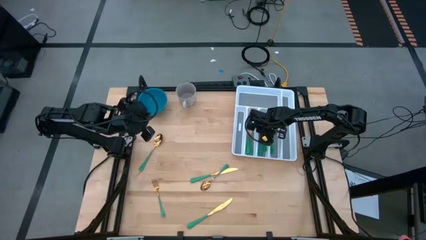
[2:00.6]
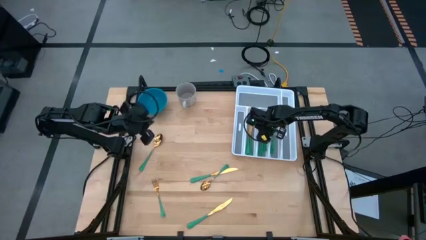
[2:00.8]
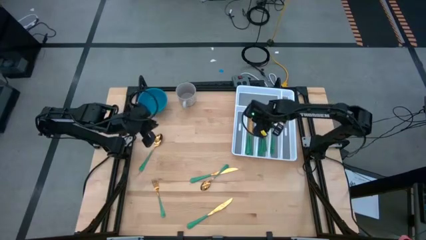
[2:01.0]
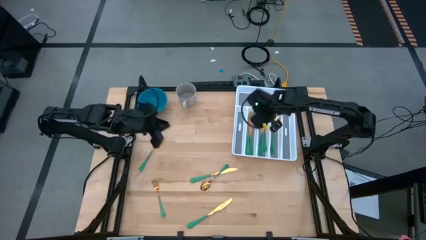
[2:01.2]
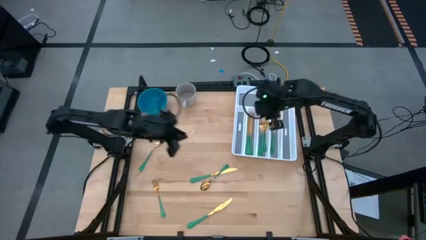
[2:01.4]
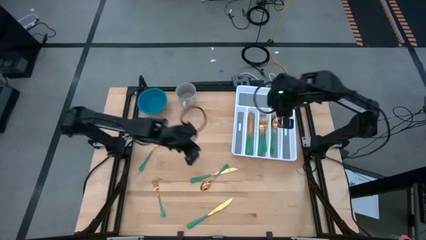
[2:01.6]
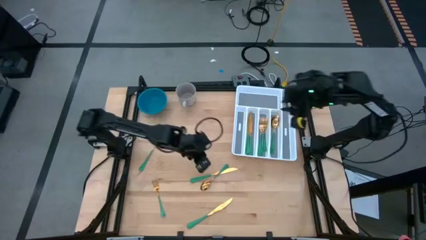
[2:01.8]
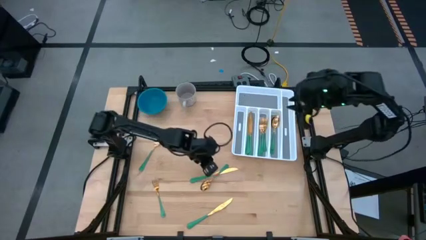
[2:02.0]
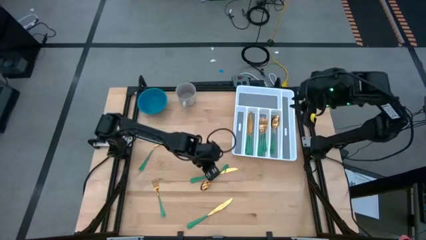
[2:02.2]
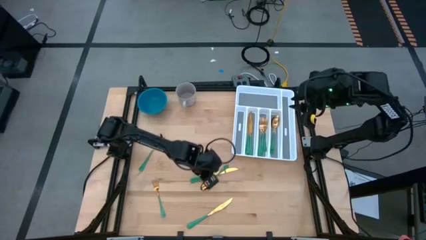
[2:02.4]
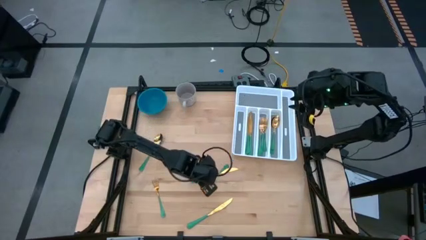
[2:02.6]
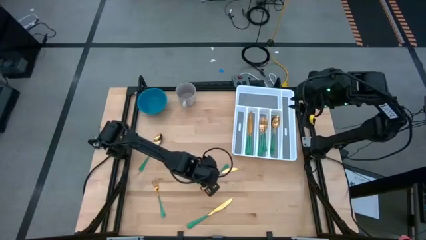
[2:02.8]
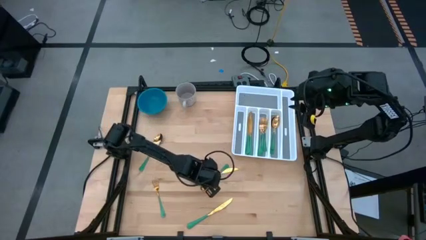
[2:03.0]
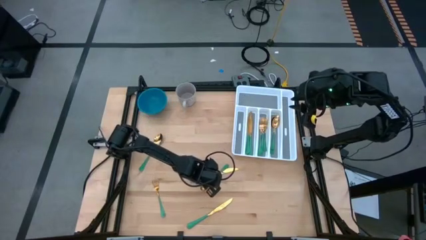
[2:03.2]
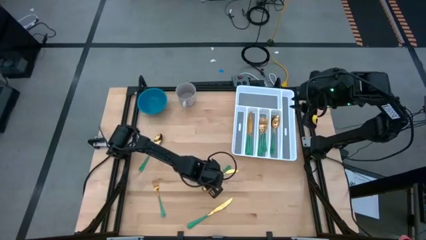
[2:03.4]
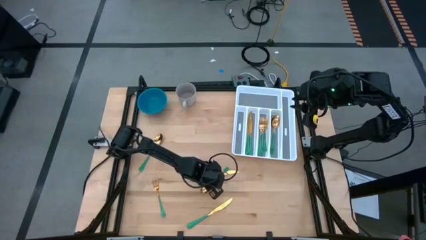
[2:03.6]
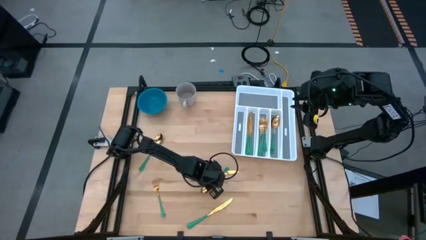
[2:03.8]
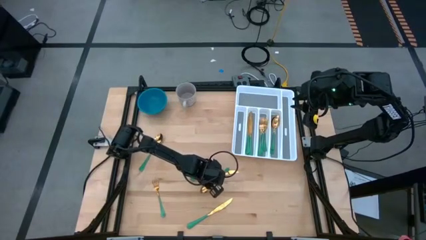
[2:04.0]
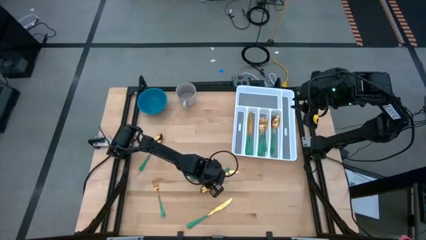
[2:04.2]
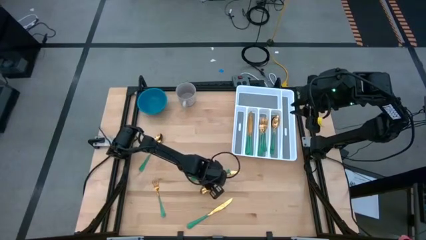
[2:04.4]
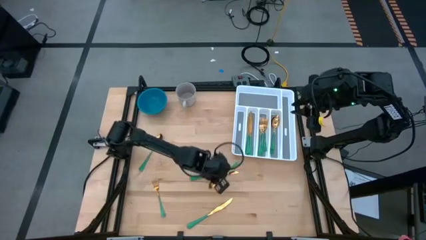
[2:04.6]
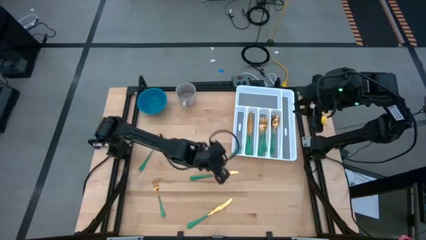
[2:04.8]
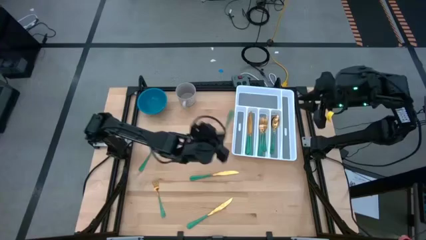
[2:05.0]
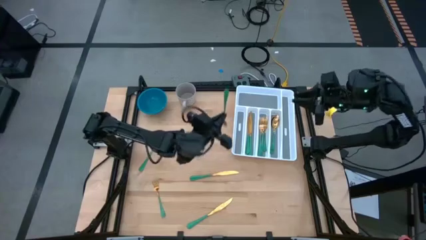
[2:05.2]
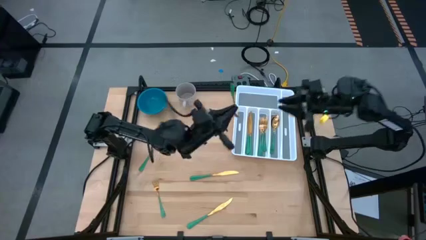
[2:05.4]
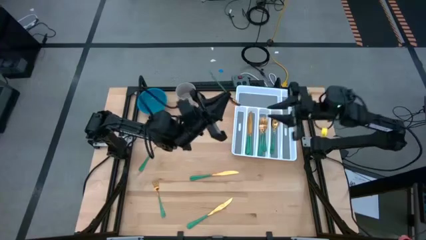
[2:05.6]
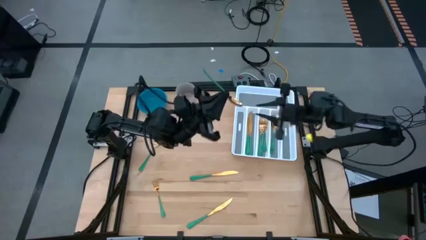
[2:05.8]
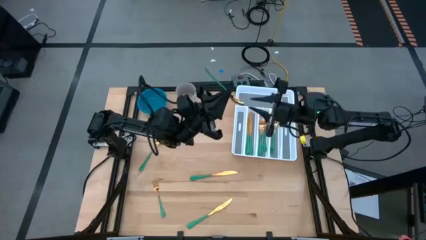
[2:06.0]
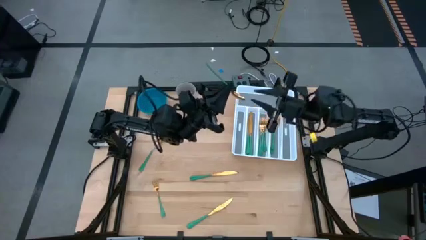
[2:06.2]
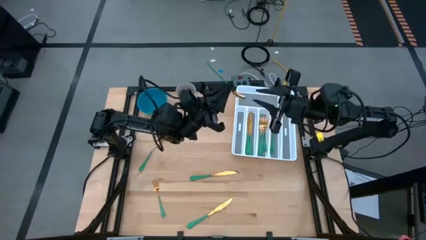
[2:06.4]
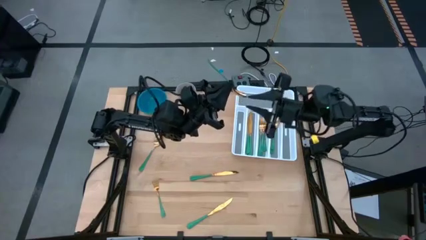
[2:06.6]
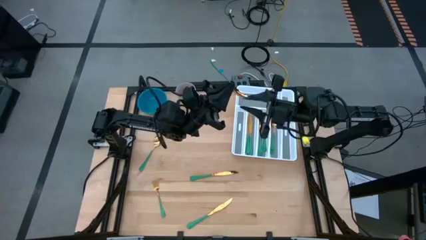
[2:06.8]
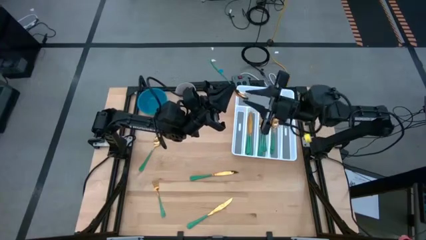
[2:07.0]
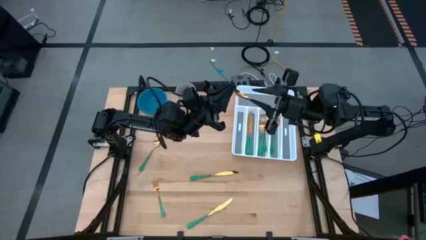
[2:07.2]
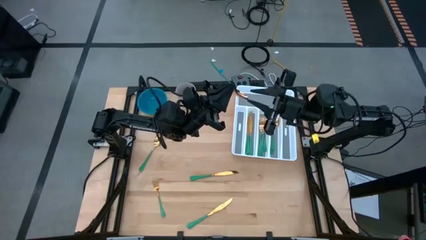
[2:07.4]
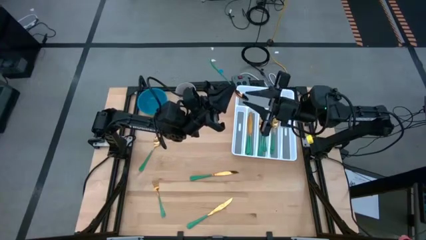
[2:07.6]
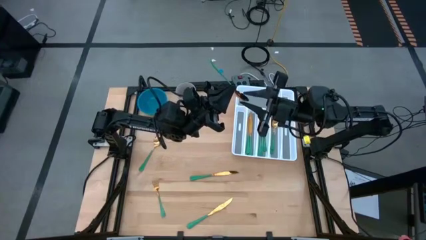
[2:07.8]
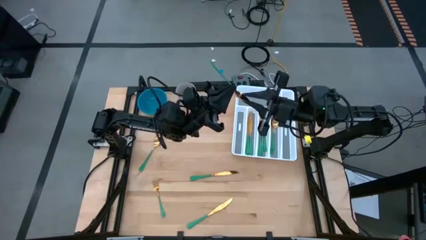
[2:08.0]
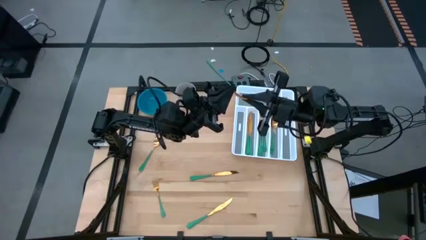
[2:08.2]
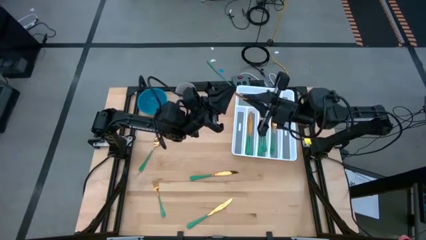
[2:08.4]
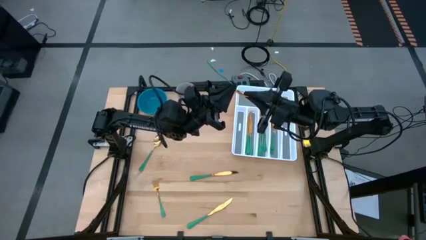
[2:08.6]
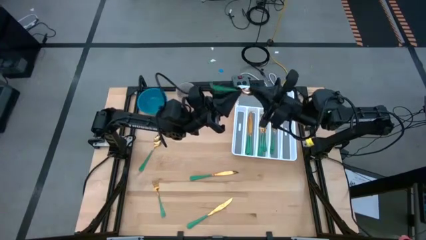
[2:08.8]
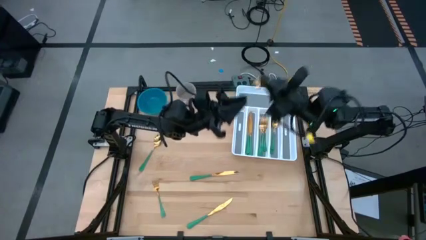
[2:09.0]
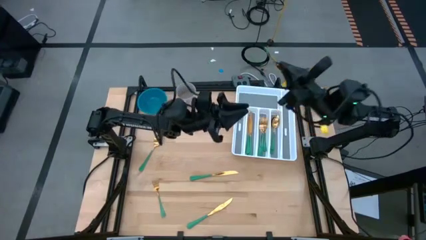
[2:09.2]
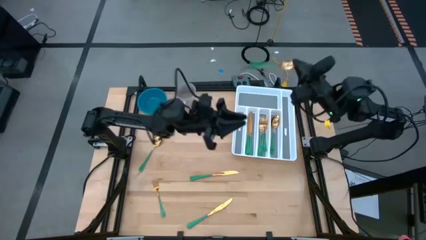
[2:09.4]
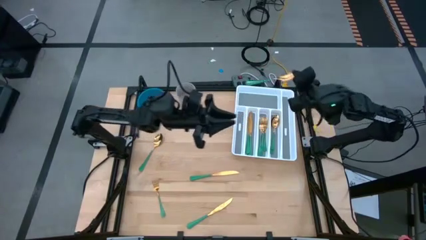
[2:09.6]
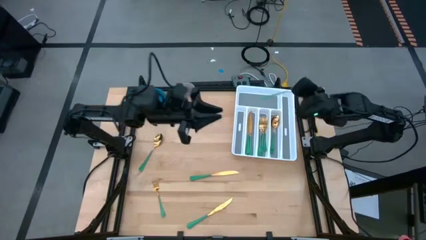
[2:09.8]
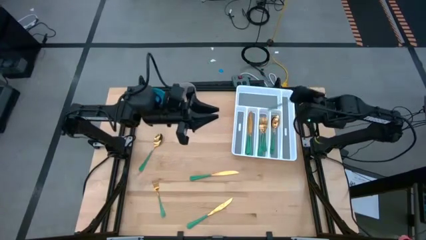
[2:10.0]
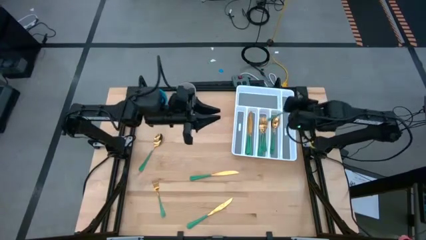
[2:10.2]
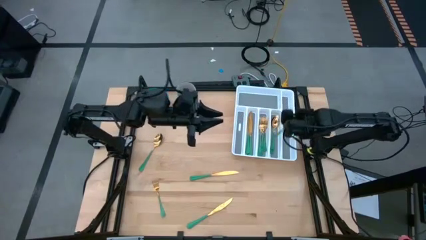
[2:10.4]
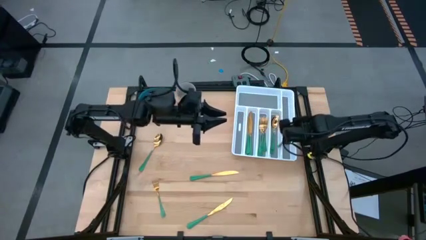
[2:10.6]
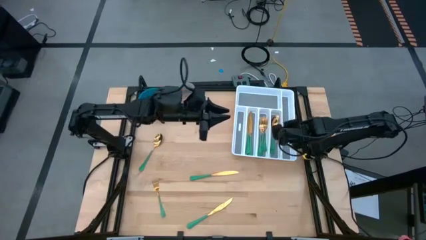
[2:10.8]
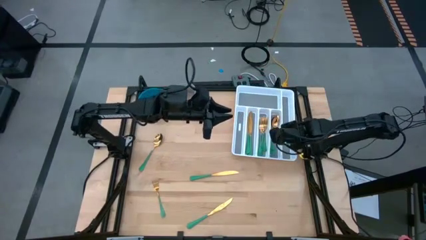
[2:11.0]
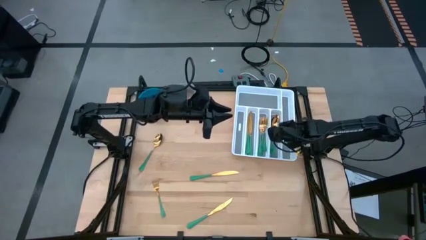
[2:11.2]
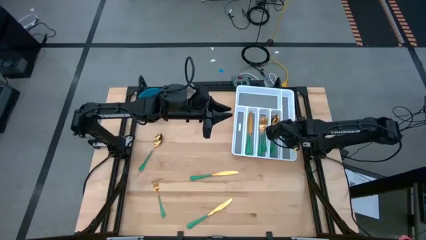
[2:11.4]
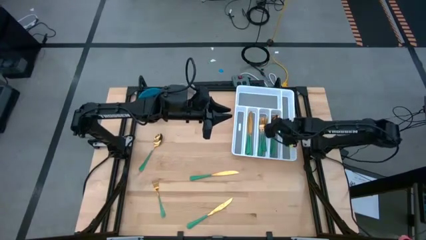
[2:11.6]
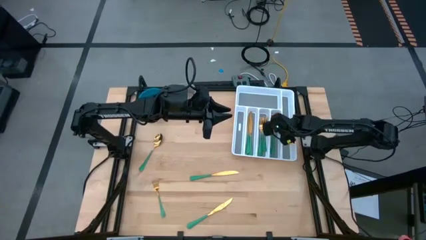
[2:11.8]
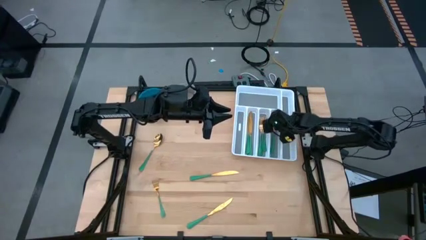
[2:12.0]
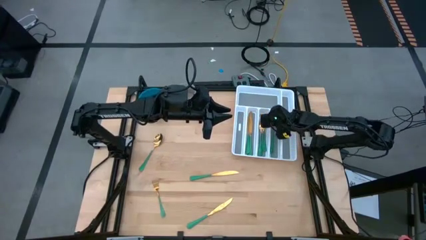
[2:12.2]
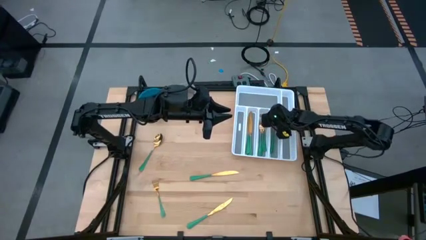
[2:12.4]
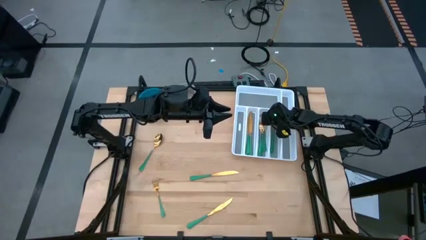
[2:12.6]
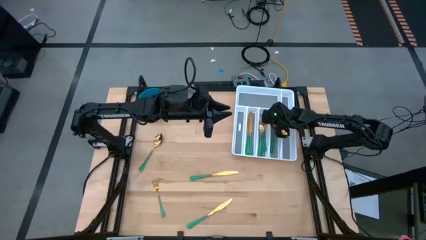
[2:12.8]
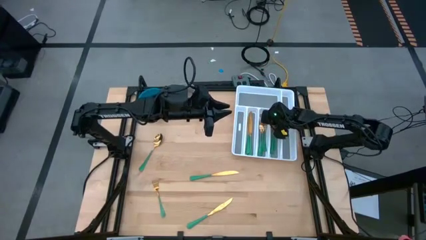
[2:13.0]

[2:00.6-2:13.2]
Task: Sort silverware
Put the green spoon into the white cutlery tray
